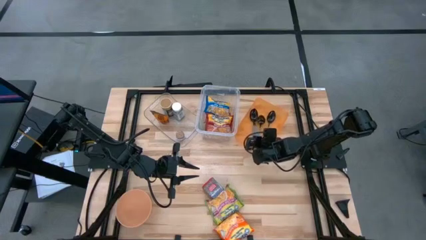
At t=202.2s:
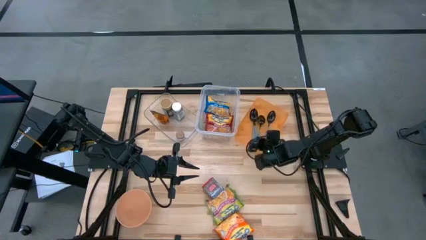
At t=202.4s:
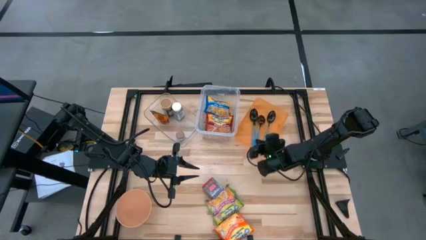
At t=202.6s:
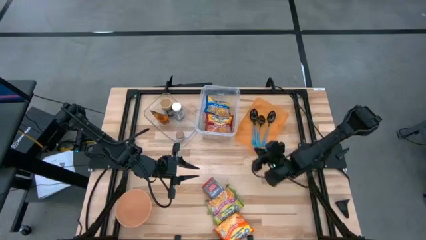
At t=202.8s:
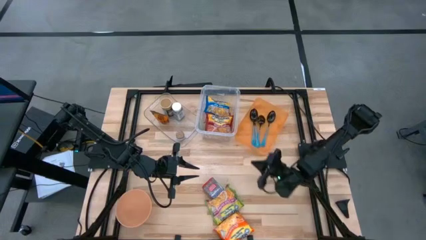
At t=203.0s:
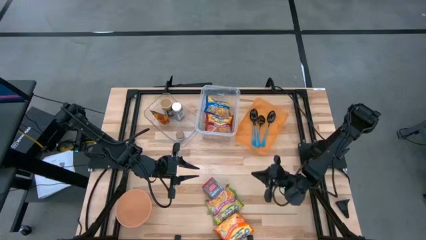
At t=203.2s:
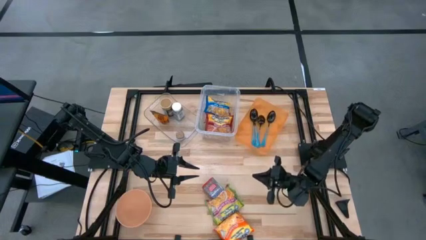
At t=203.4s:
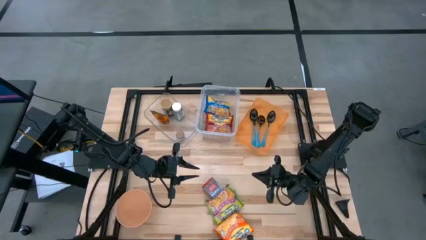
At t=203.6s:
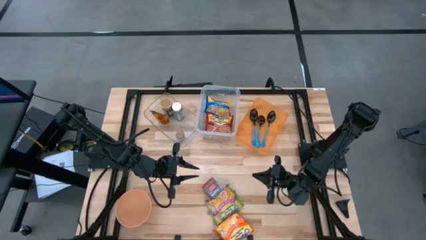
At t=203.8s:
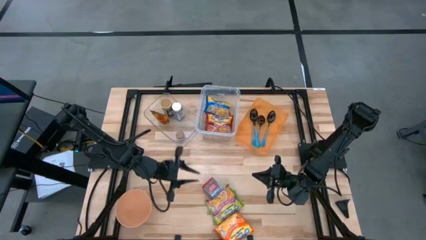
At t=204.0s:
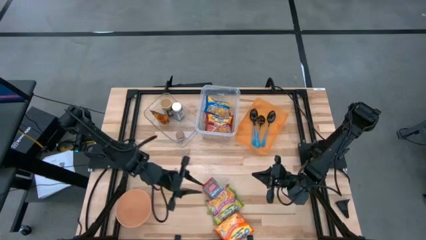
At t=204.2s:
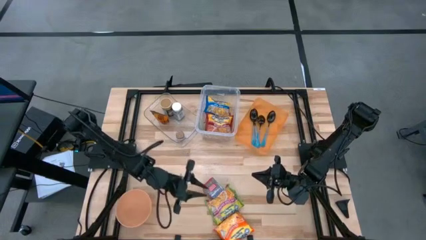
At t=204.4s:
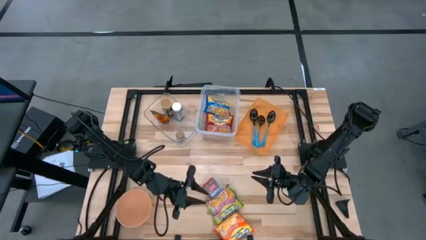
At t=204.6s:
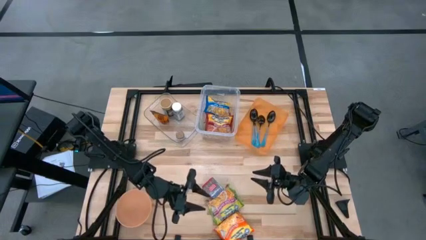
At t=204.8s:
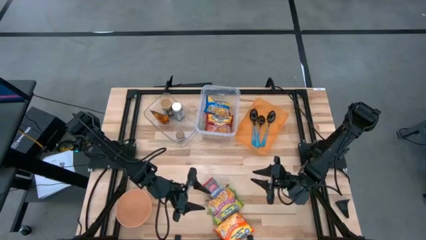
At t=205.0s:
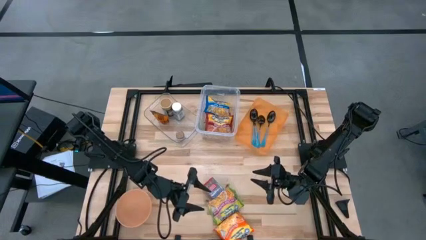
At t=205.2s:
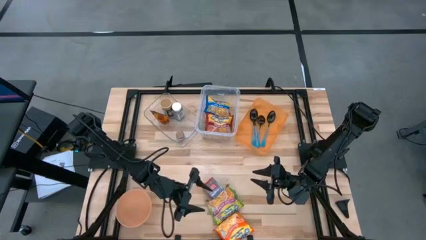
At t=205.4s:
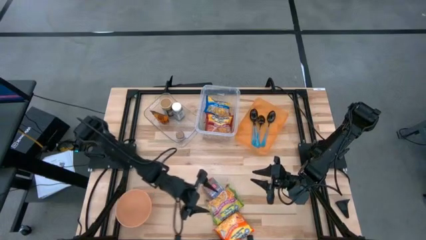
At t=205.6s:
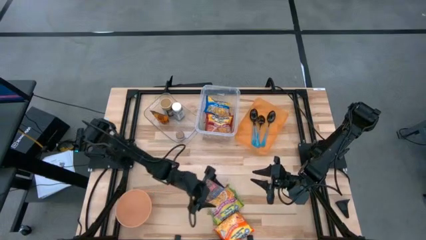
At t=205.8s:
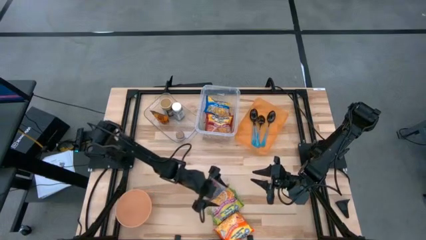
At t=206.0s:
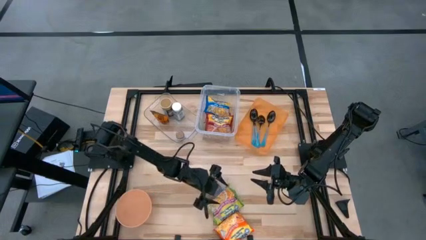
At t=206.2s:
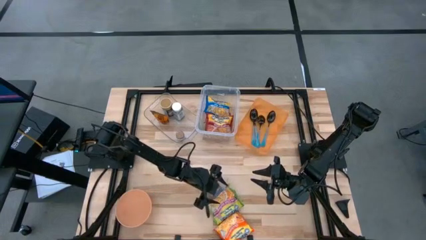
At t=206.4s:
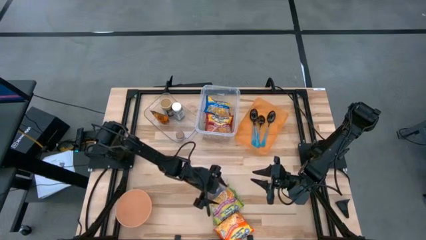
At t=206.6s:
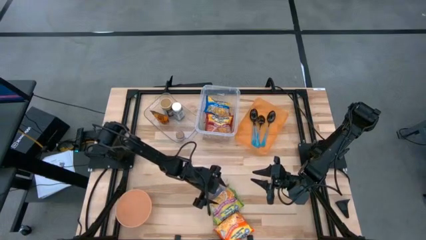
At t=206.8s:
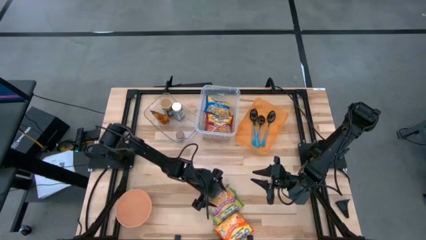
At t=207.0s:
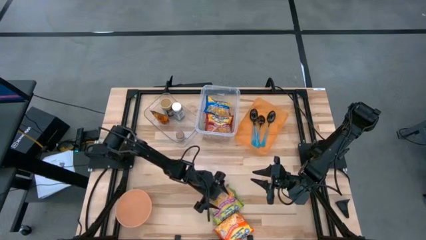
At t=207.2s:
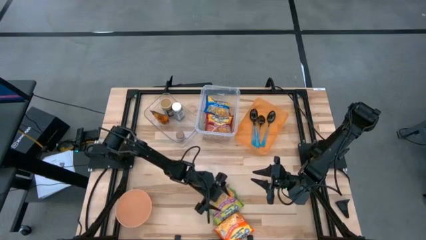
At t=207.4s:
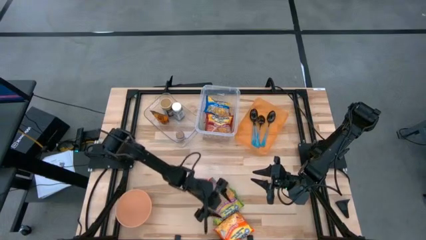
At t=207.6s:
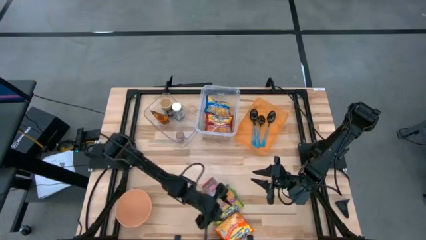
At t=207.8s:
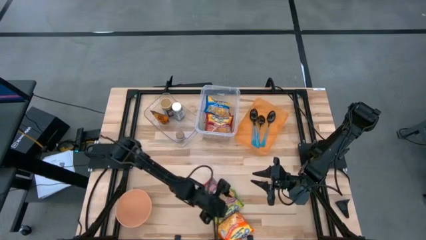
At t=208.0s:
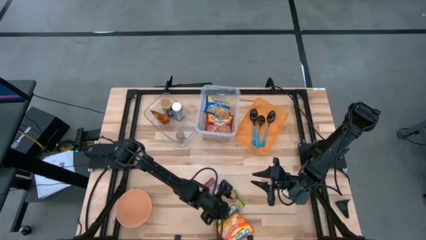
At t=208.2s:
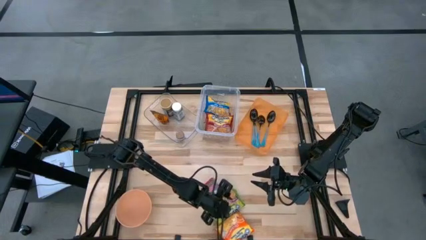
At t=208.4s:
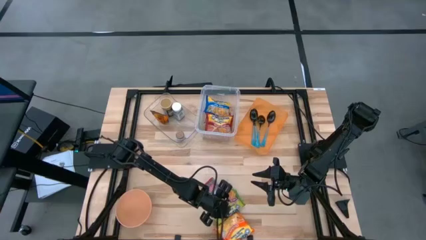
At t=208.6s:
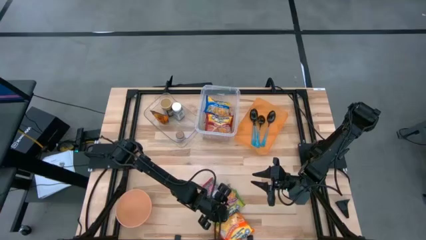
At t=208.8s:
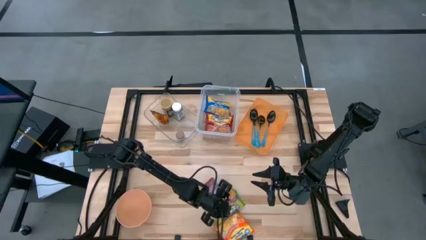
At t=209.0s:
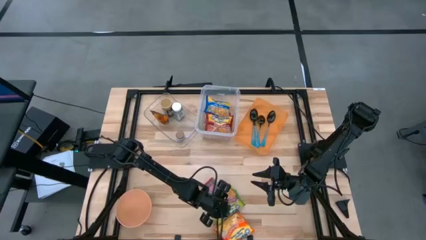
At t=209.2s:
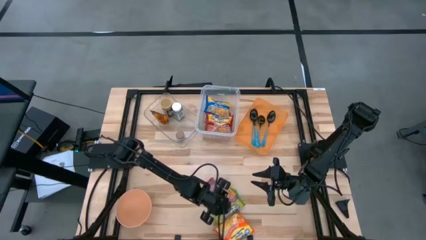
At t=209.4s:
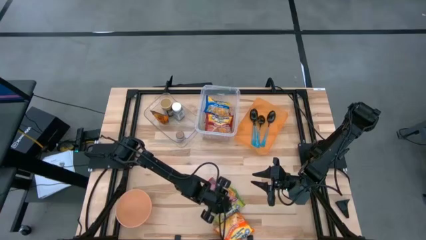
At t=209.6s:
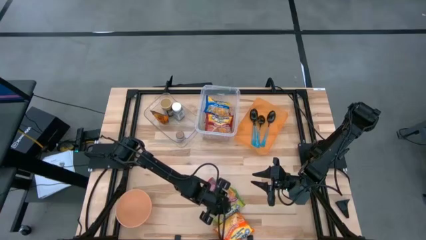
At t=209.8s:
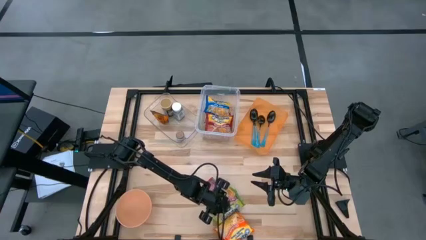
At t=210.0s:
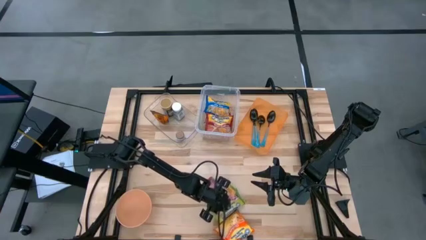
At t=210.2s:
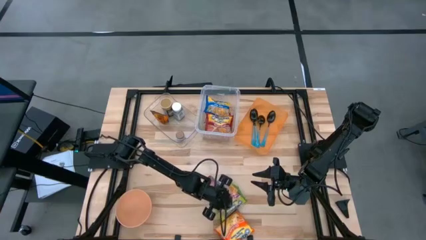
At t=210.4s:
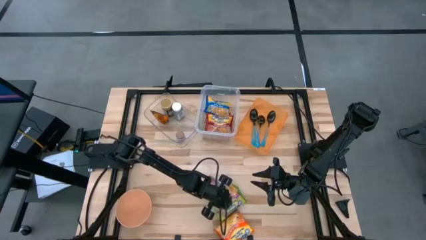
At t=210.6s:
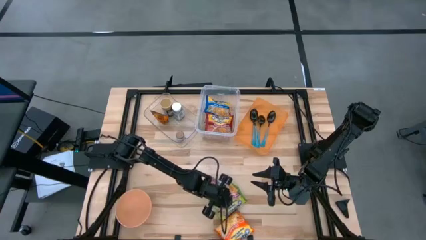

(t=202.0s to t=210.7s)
Task: Pick & Place Food Item
Put the green noodle pack into the white bin

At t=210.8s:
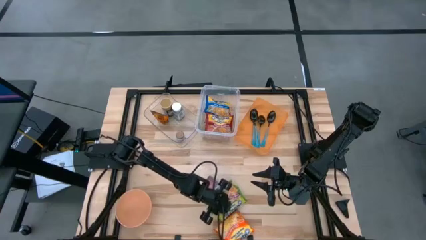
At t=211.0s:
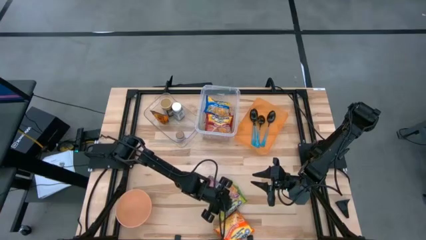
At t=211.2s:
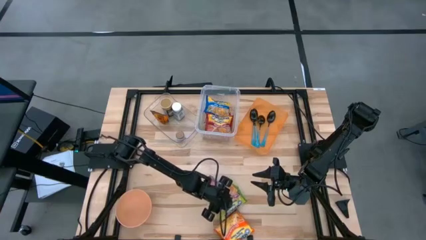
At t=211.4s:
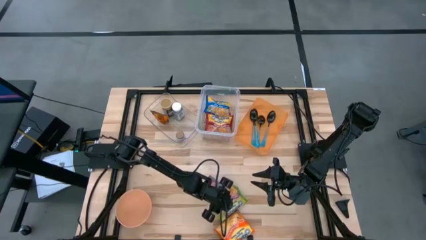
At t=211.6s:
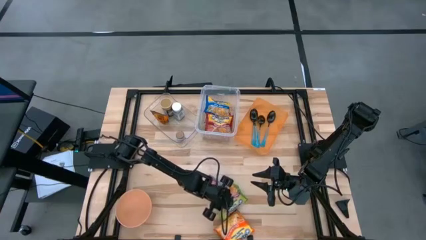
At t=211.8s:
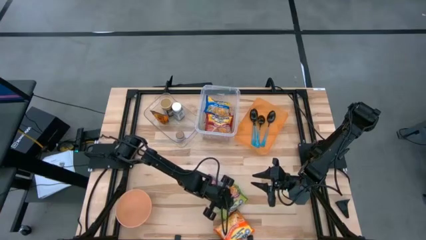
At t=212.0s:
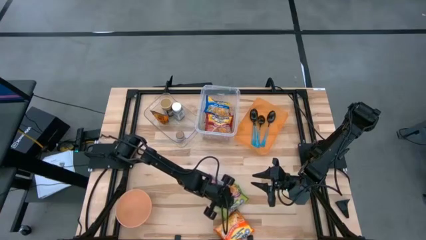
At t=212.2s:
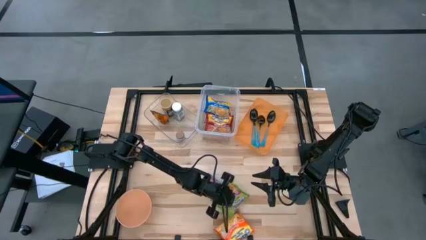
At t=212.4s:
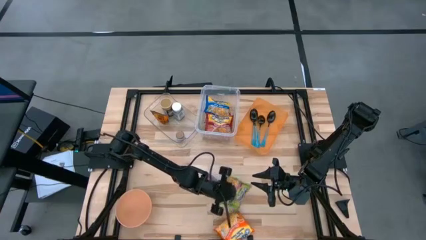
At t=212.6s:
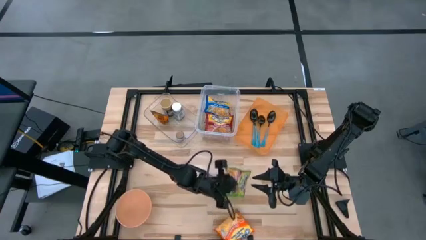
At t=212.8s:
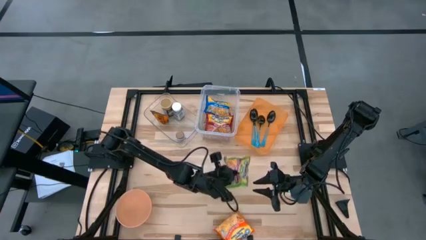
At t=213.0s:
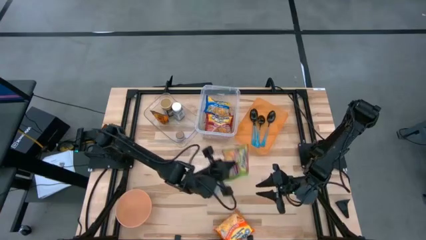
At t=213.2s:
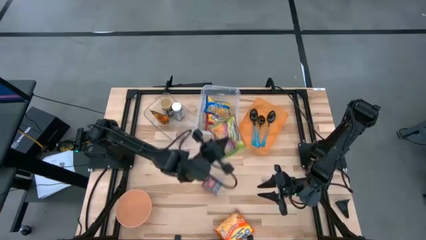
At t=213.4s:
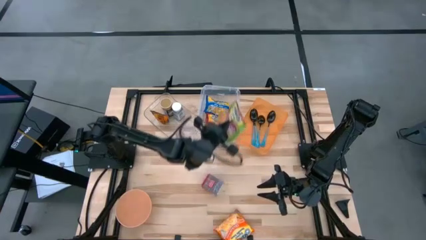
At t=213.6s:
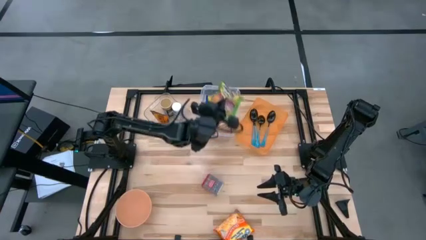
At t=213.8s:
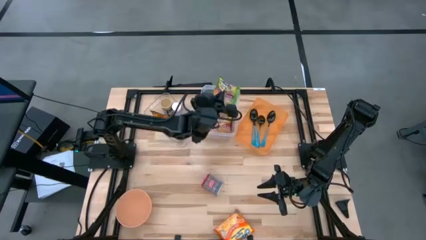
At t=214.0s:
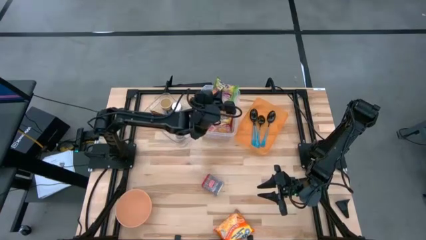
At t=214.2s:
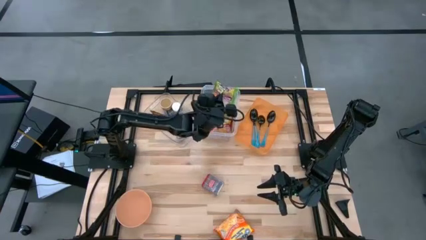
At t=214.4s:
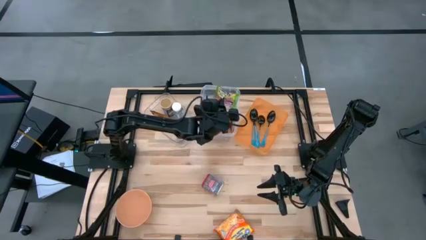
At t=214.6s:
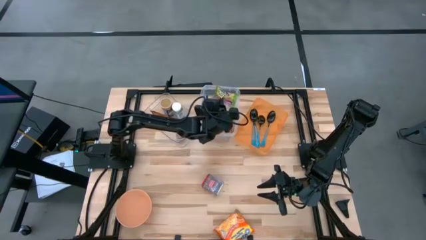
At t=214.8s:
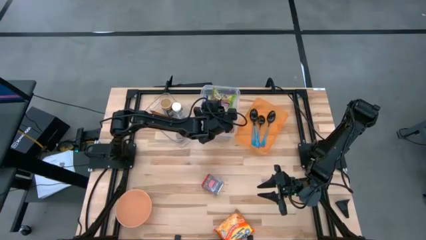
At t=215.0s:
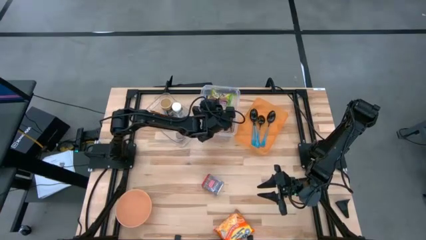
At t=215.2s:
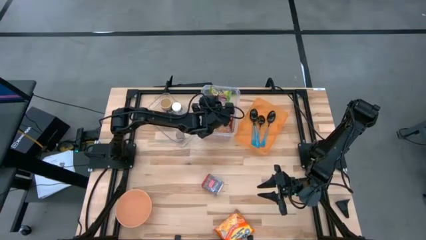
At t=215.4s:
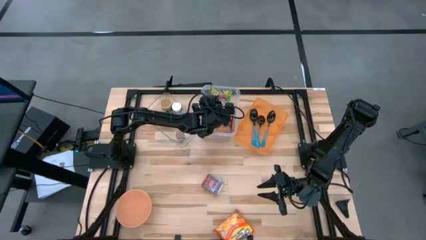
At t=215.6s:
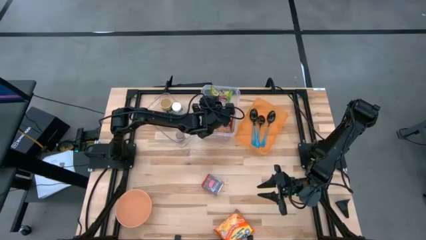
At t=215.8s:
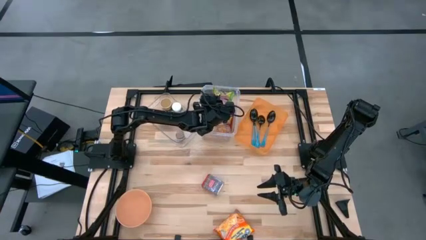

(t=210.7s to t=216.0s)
Put the green noodle pack into the white bin
